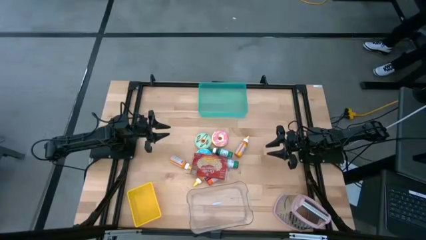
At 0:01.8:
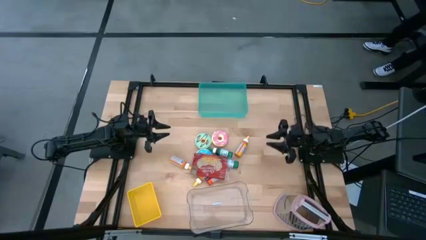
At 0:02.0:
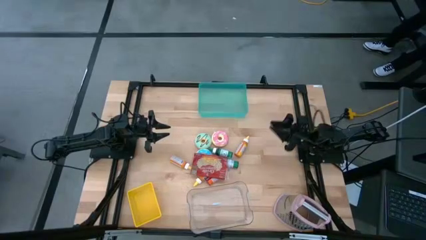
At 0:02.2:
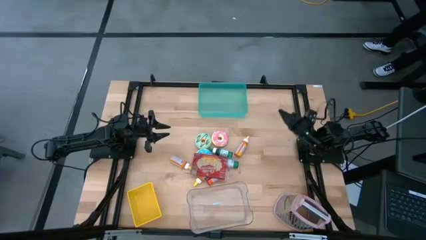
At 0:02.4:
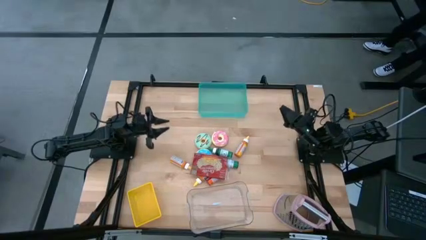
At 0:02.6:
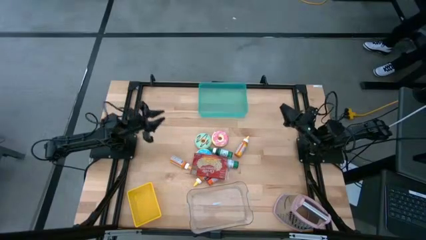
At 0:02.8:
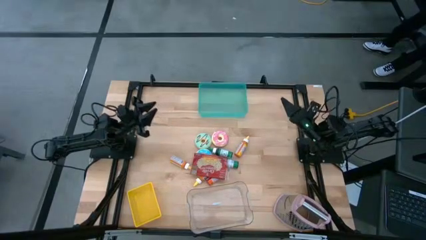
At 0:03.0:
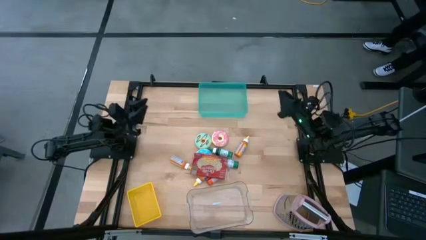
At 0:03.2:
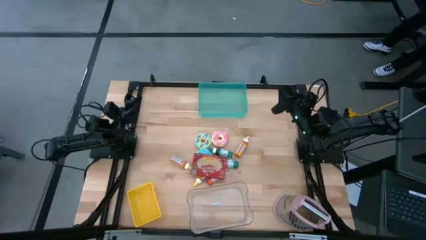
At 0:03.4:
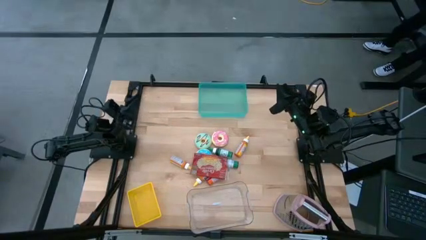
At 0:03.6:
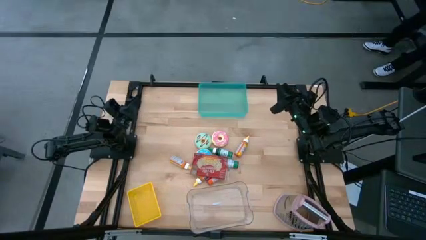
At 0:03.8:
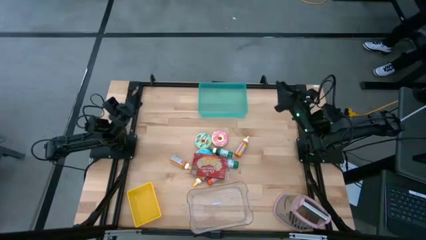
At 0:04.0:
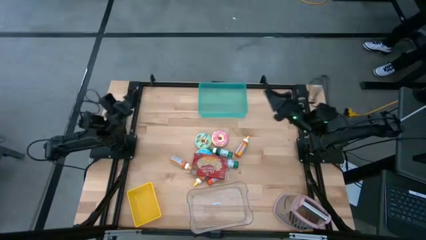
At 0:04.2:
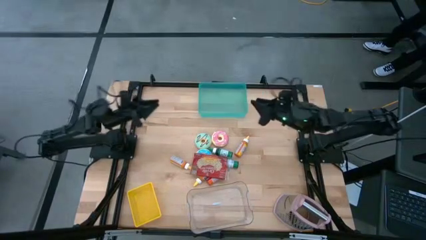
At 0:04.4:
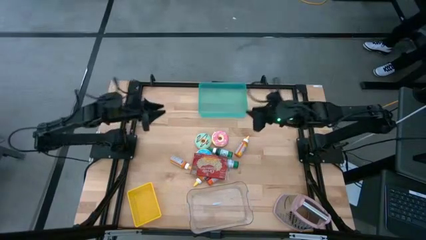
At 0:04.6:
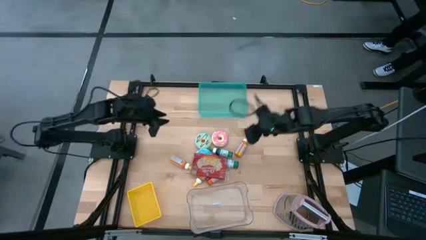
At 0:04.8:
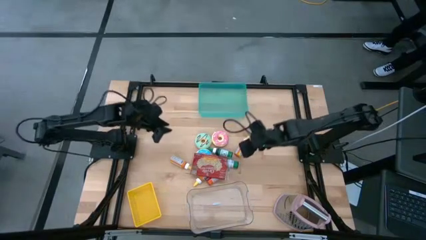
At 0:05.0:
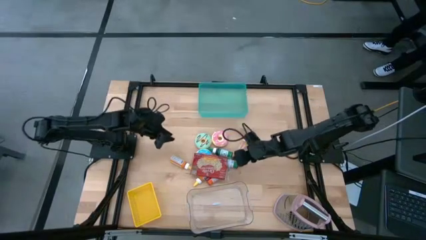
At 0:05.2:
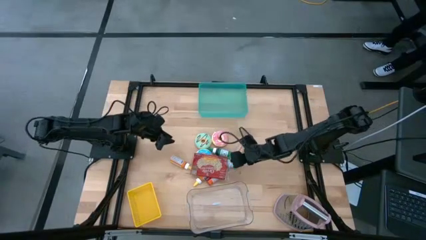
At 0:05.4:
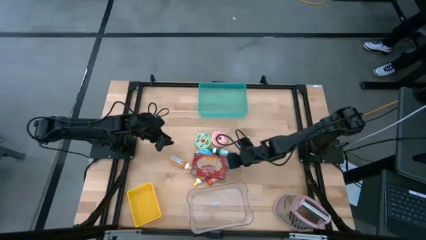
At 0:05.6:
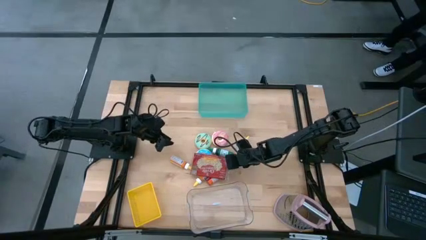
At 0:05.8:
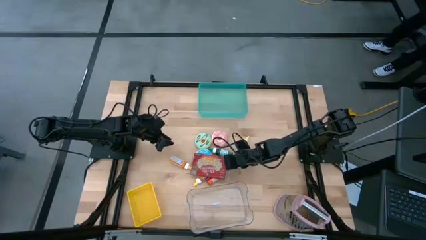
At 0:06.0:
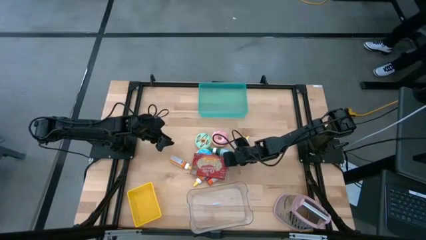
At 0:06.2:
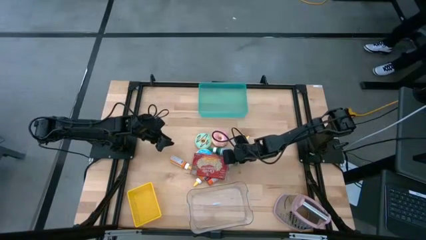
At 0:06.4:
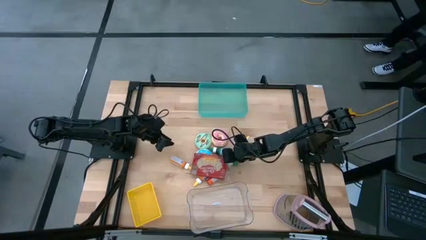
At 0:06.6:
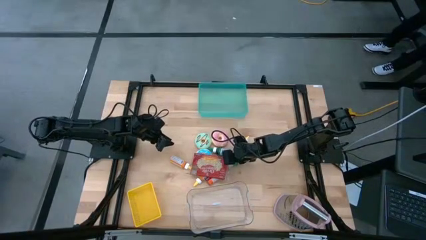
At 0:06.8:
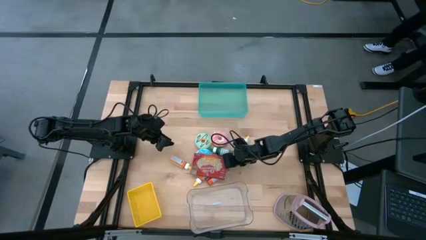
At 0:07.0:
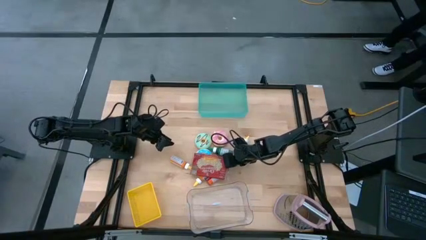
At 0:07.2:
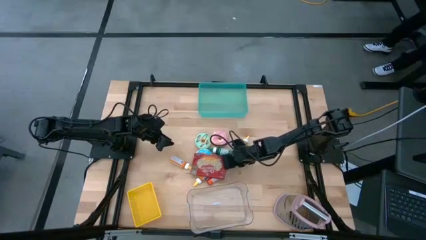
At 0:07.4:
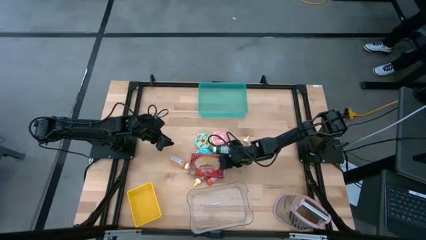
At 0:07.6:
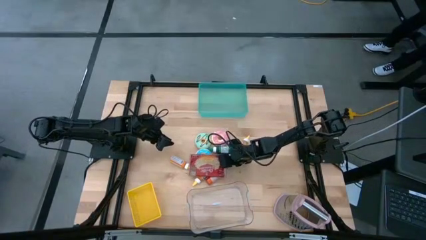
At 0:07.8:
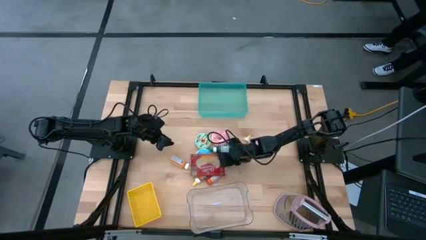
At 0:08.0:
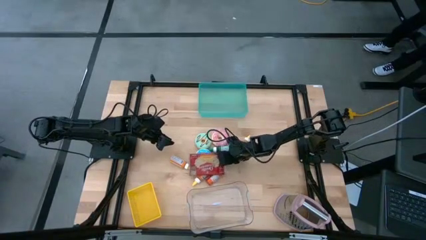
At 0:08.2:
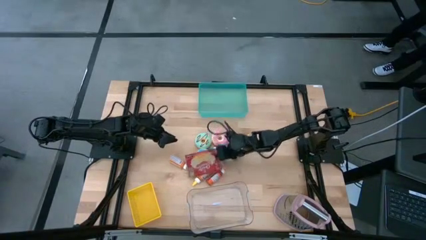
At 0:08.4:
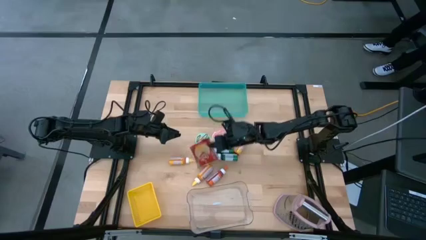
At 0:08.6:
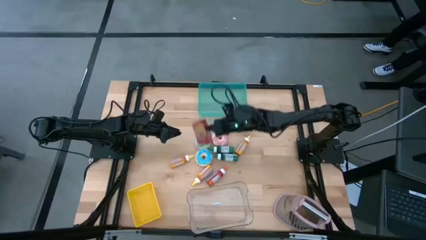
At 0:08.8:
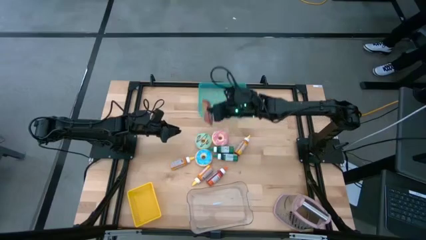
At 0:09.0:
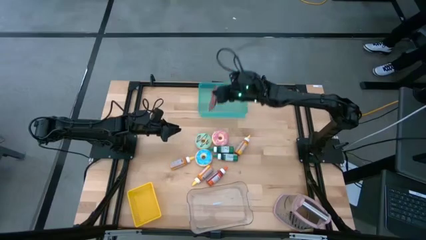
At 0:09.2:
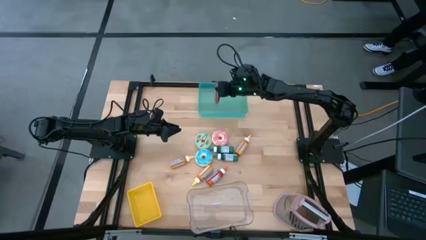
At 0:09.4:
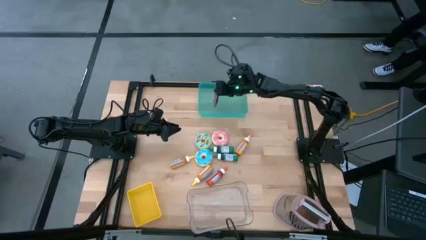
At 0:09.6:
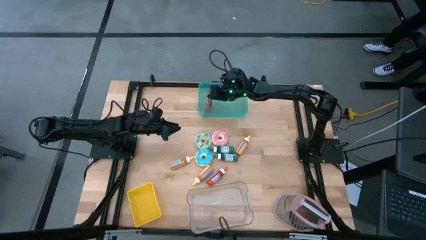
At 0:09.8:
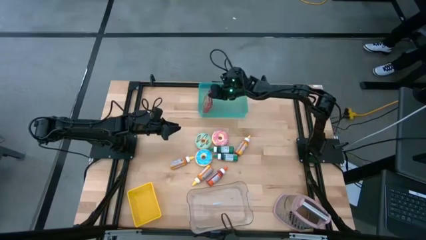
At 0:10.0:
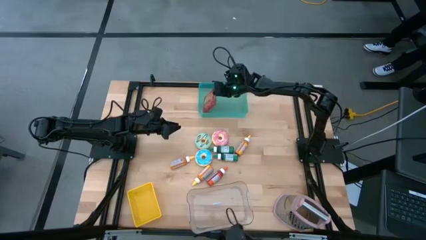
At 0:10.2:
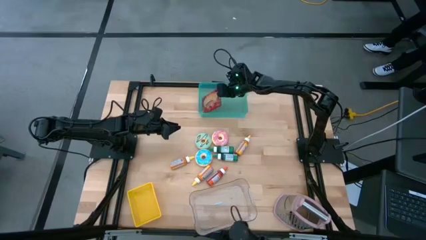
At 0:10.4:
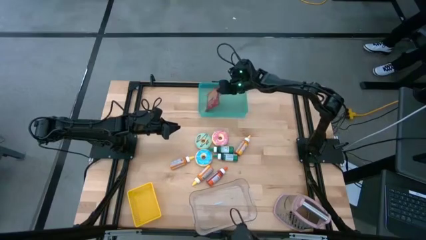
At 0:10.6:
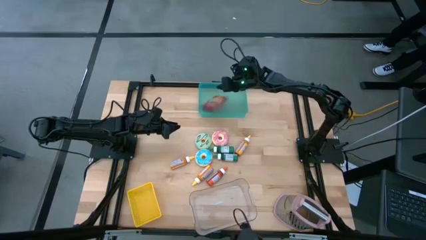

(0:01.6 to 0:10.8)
Put the red popcorn bag into the blue bin

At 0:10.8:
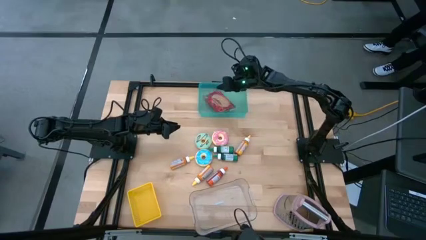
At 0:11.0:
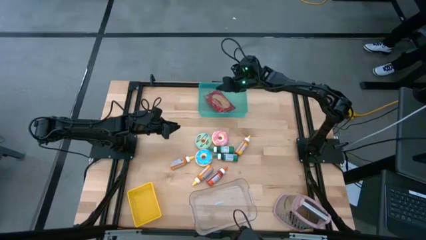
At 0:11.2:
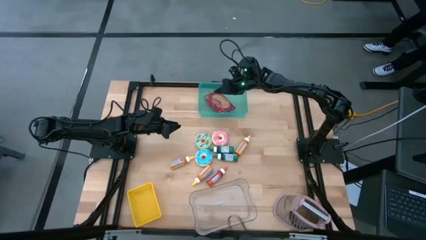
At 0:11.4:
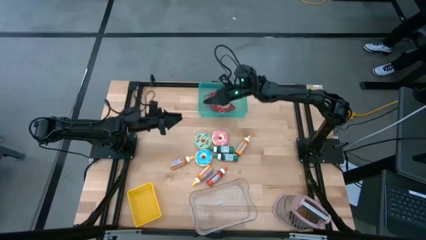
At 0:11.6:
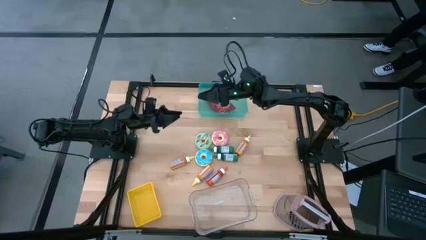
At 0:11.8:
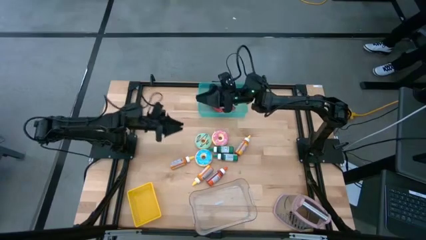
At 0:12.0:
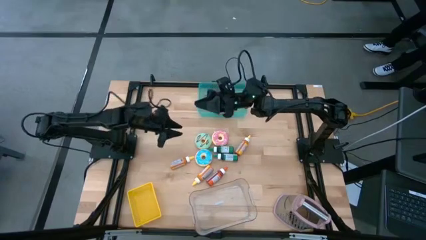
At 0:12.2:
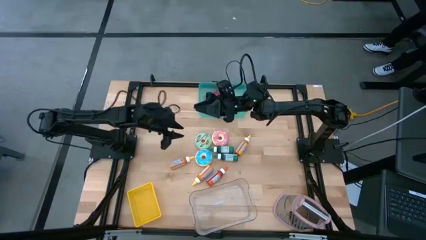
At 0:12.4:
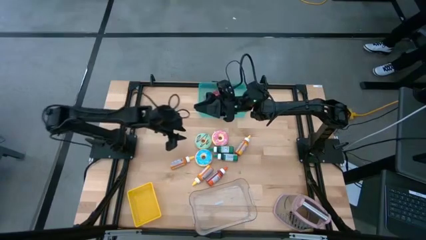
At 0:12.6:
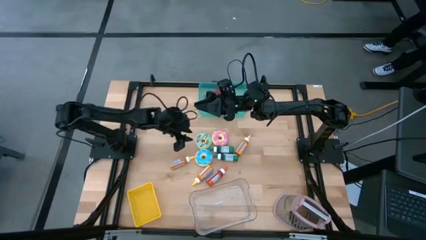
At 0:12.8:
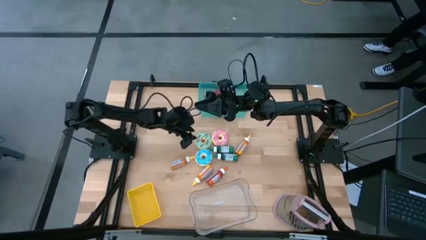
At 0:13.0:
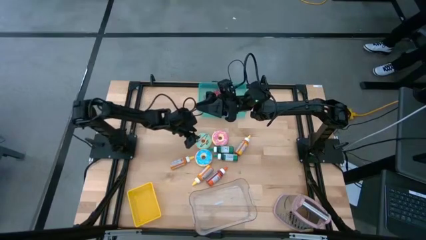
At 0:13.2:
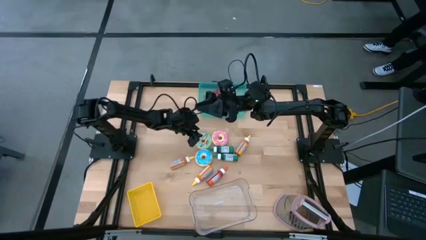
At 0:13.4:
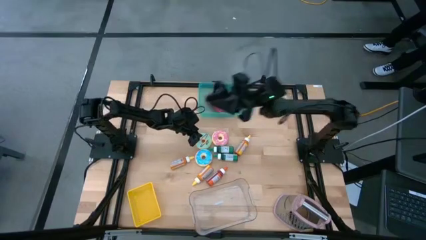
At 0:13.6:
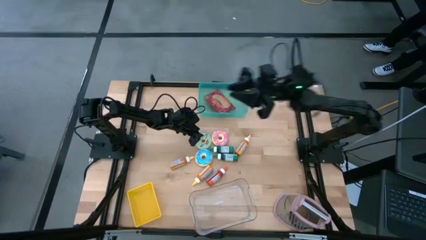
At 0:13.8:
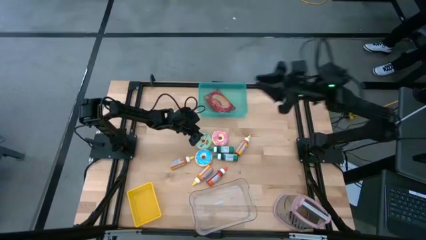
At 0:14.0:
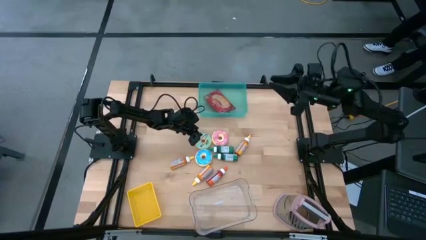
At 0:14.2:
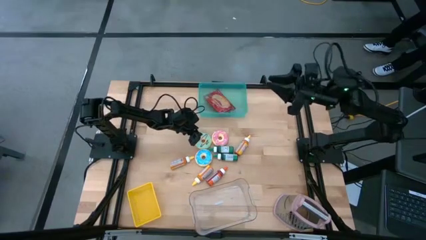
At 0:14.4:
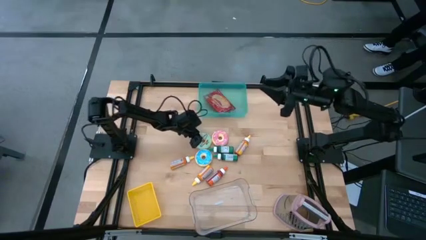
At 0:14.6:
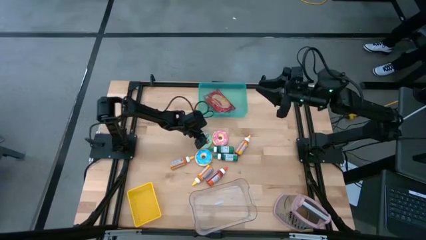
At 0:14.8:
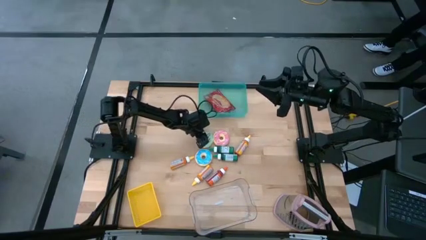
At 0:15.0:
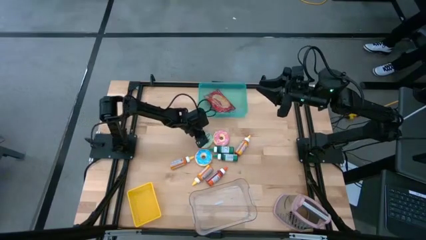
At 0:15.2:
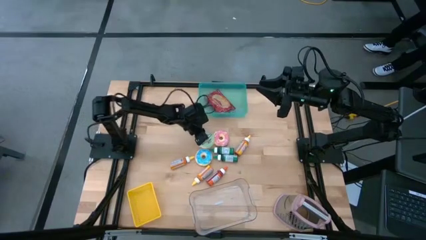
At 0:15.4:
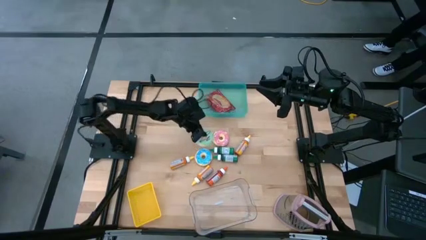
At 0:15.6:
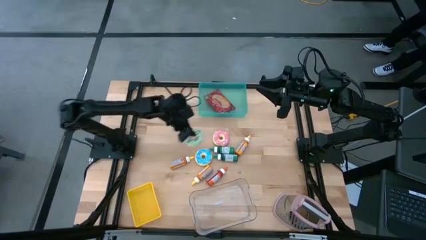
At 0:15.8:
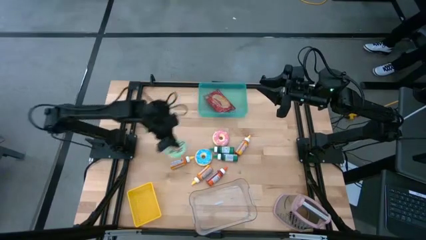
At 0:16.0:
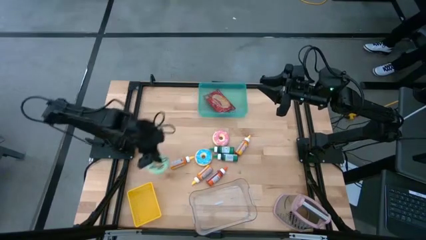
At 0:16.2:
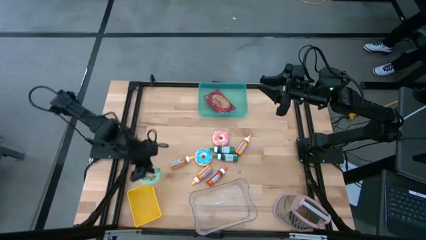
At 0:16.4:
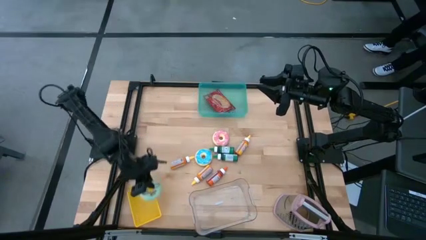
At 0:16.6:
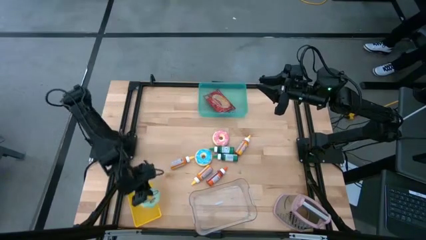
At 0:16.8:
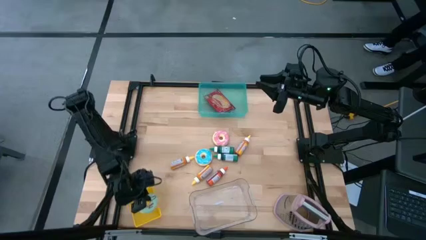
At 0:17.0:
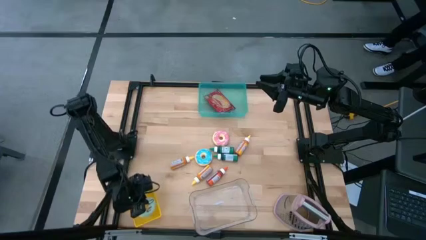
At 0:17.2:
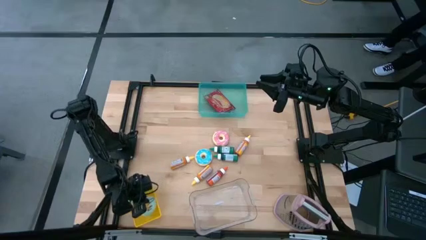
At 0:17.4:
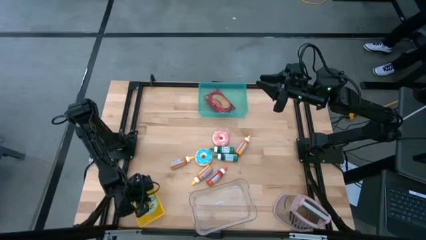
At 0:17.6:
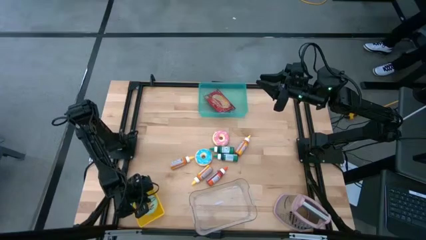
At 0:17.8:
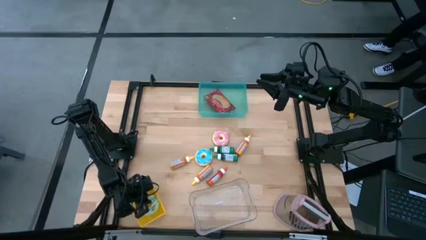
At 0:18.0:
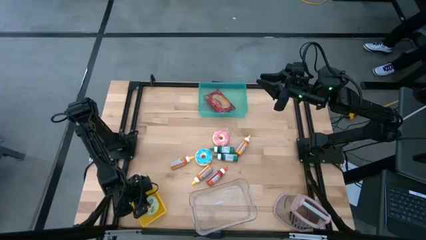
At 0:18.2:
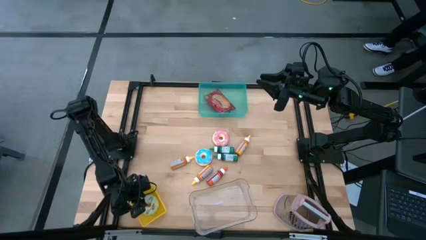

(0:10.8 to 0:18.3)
Put the green donut into the yellow bin
